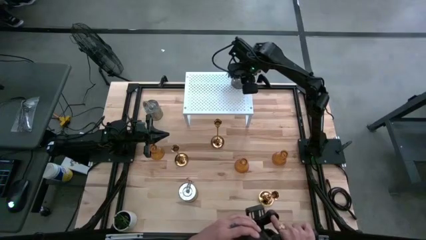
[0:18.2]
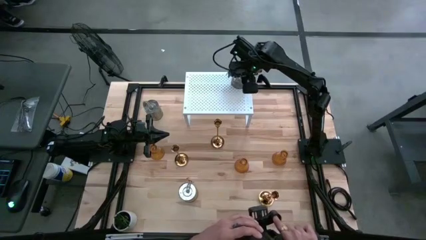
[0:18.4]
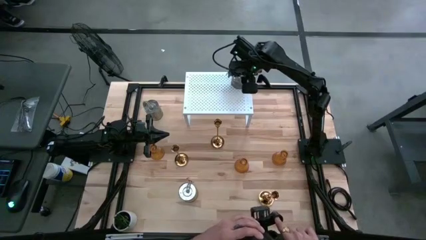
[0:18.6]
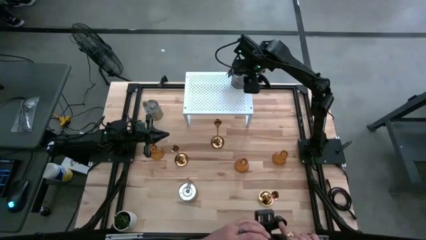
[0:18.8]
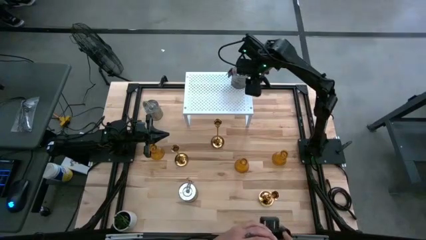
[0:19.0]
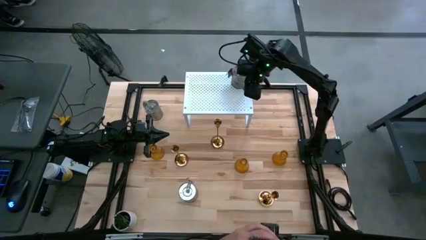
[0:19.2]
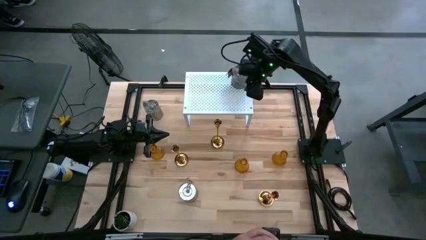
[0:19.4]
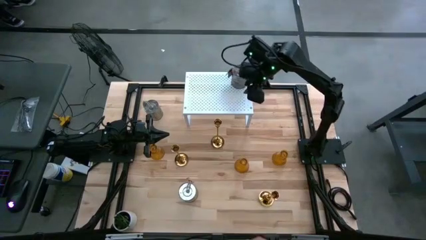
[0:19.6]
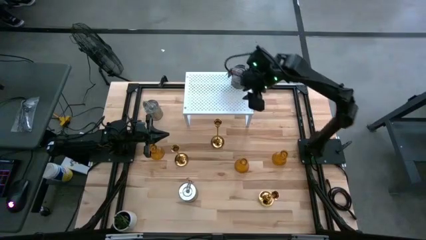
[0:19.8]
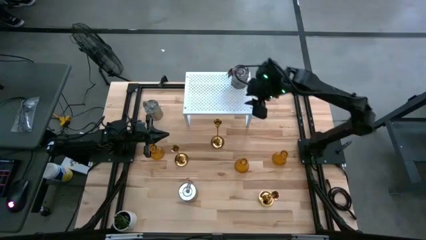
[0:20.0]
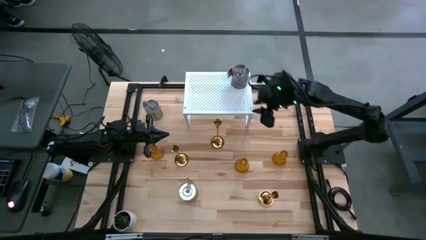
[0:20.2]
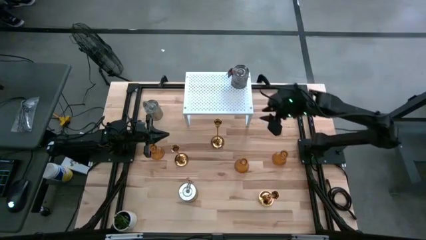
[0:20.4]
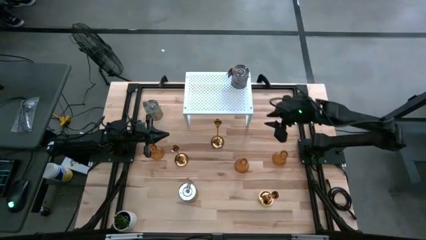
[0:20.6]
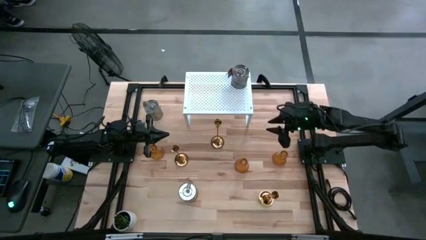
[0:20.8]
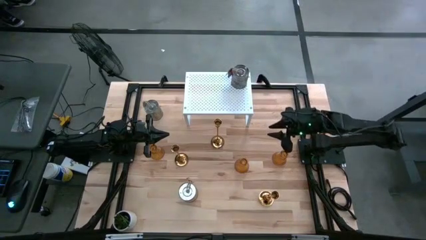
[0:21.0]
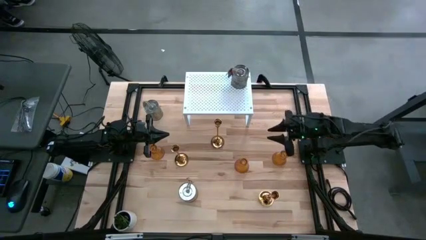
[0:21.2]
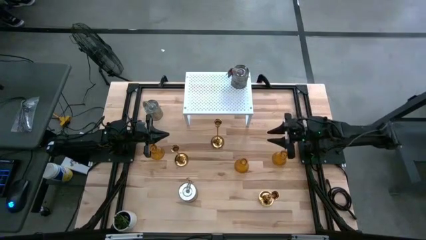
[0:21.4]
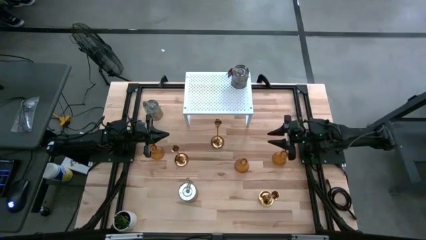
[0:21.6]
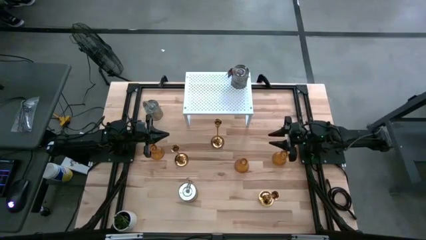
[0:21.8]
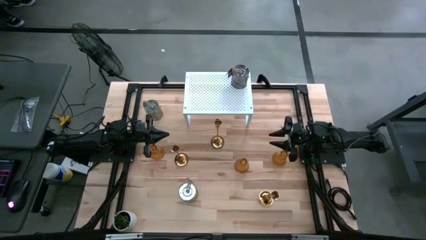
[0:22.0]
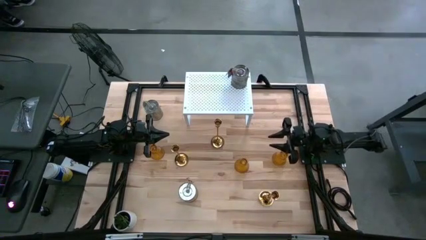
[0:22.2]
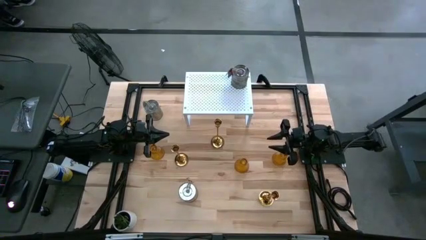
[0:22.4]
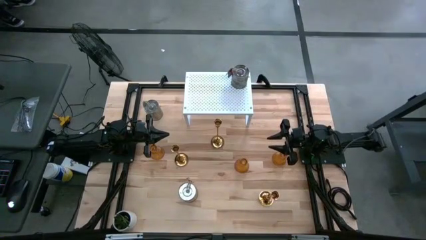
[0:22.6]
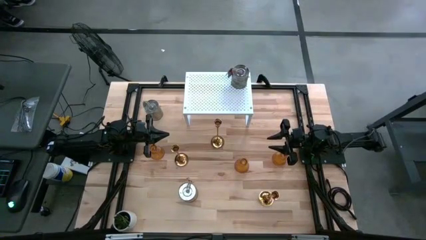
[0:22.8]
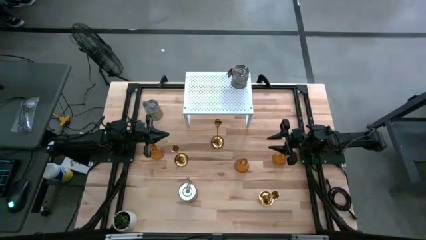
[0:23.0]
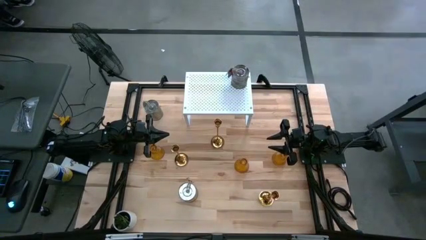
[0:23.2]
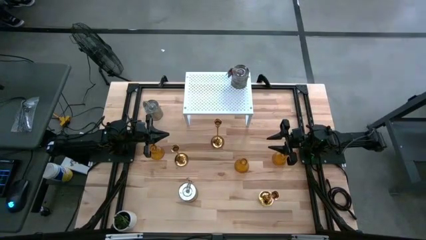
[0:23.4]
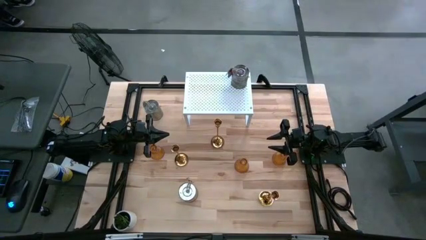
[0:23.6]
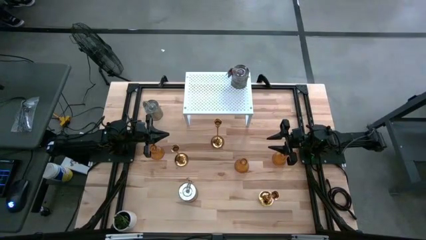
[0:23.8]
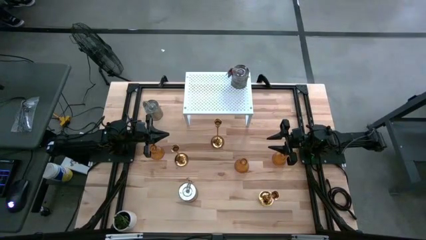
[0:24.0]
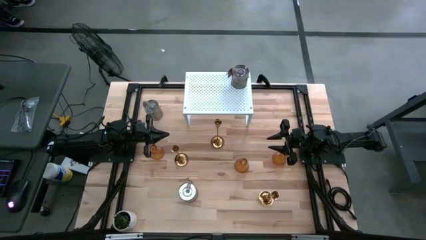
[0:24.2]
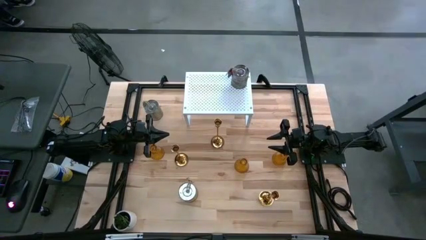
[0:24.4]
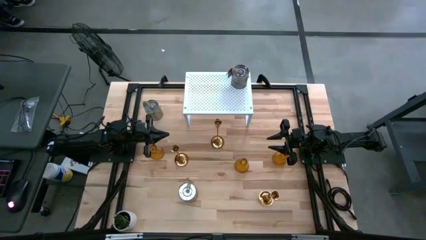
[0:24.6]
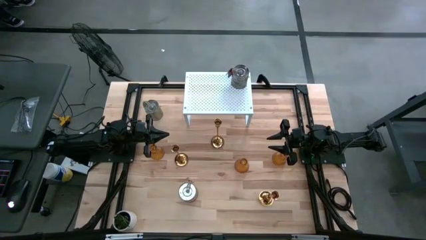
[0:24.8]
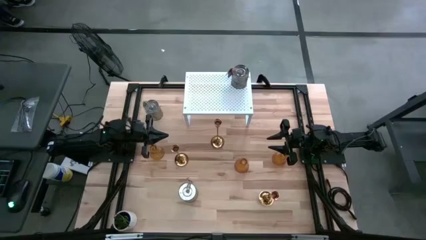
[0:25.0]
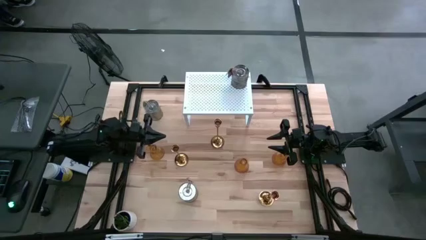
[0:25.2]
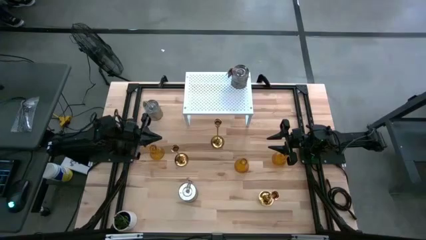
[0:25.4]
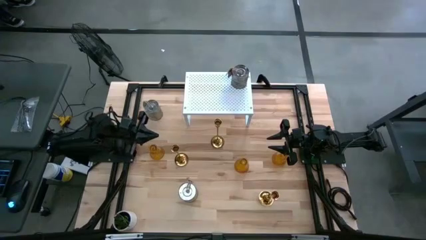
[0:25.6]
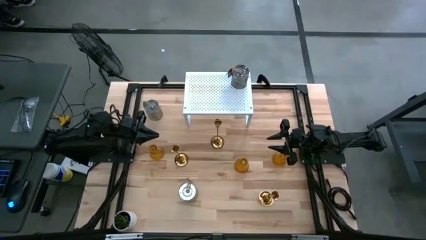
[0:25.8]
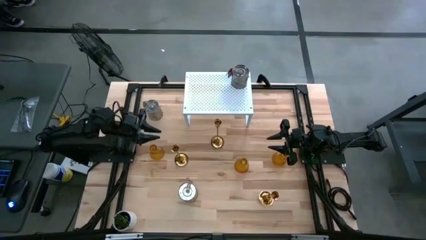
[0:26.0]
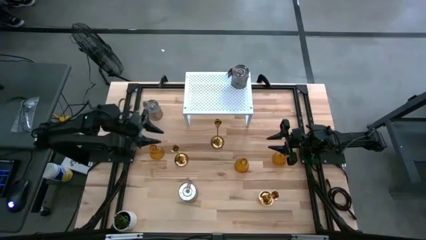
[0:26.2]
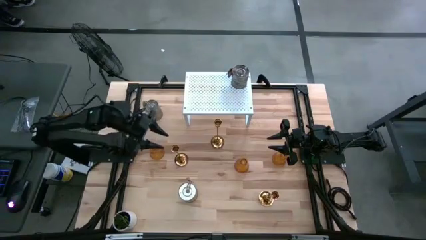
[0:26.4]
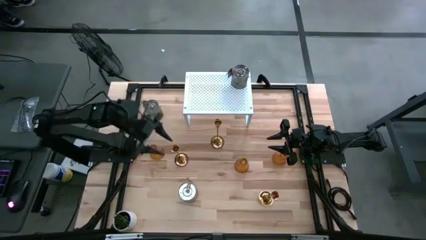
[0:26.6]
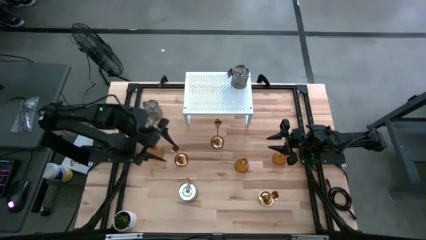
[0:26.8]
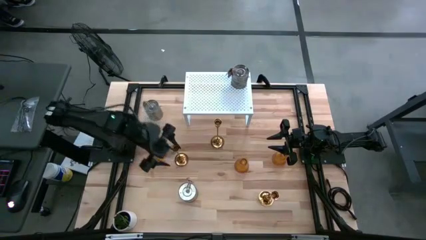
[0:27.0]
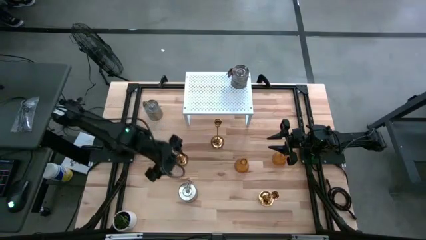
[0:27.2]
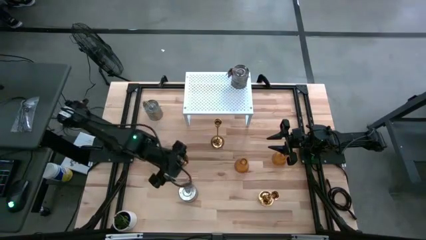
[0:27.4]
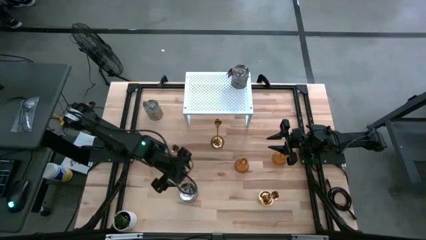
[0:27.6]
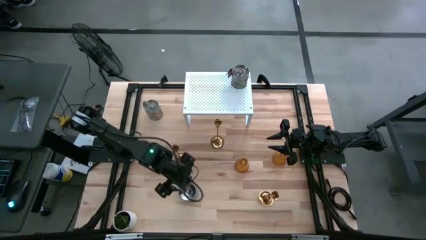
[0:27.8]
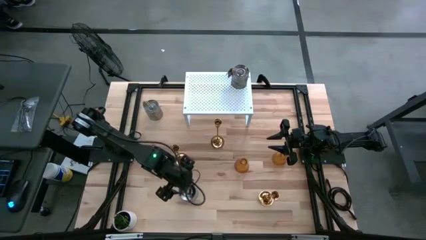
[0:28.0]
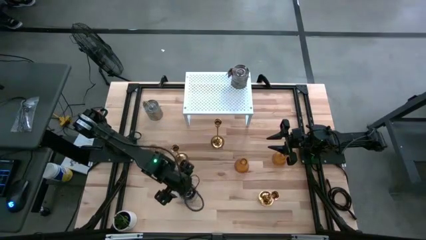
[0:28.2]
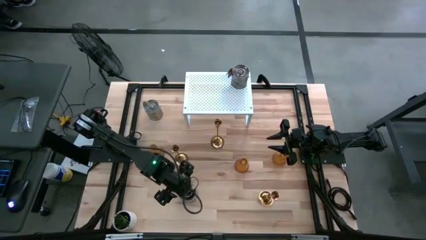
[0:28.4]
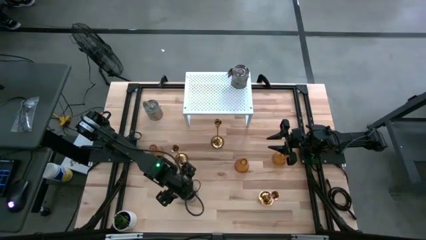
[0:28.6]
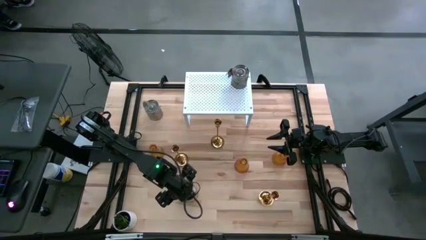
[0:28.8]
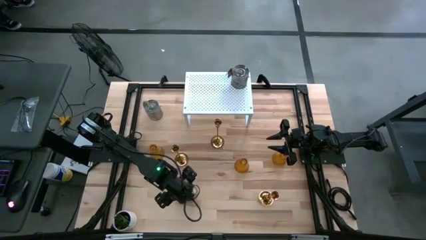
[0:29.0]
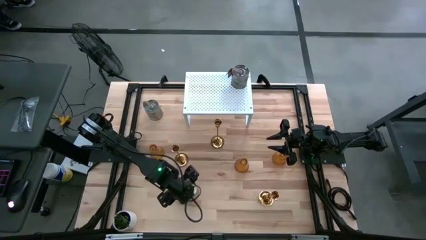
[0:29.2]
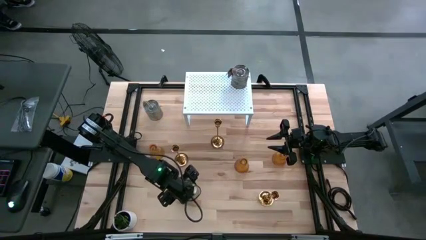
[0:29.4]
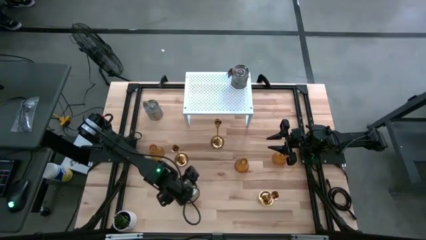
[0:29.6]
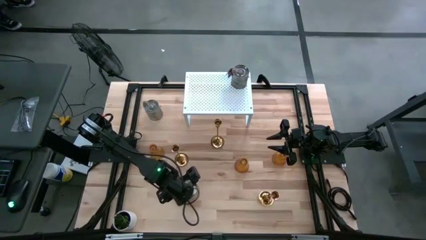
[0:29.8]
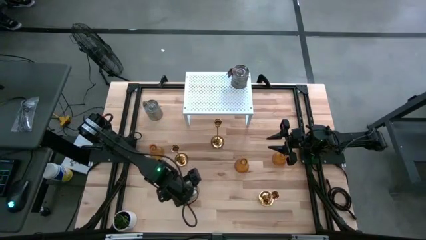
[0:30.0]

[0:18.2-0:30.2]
Task: Pick & Place candle stick holders
Put the bottom silver scented candle aligned with the other silver scented candle on the shelf

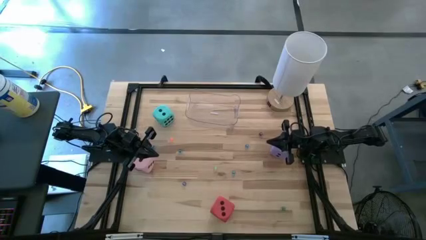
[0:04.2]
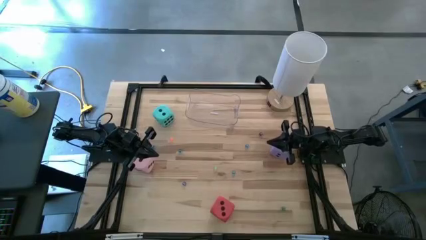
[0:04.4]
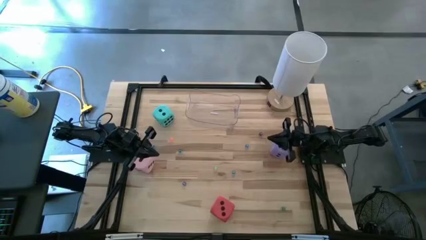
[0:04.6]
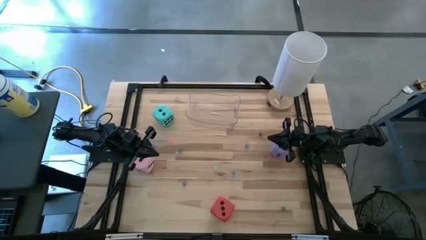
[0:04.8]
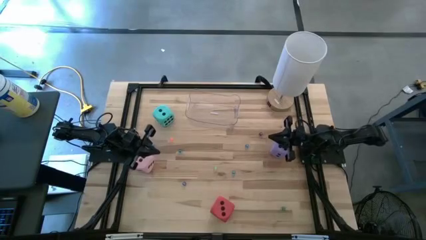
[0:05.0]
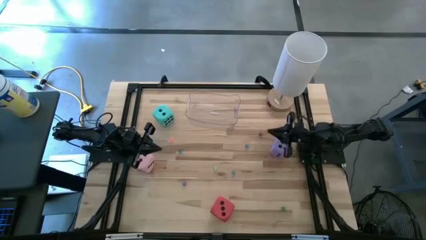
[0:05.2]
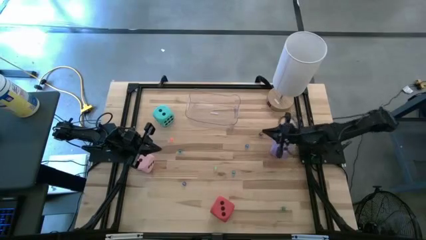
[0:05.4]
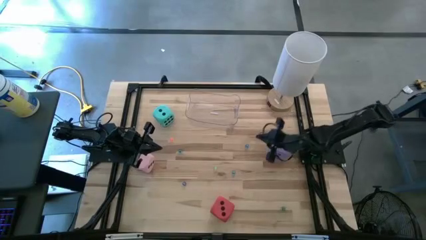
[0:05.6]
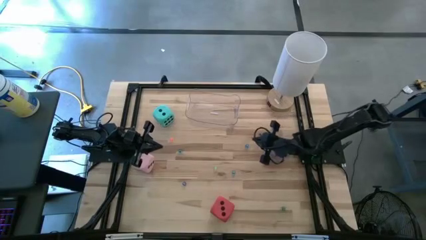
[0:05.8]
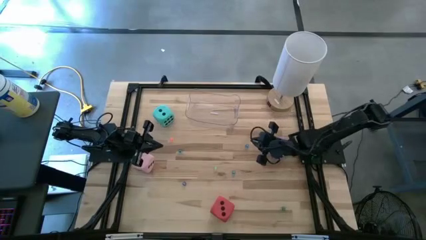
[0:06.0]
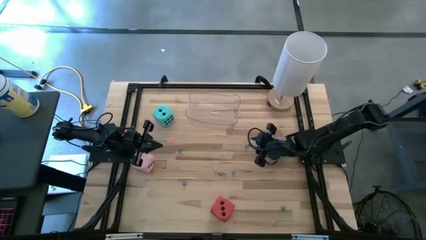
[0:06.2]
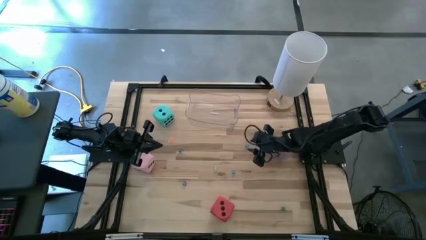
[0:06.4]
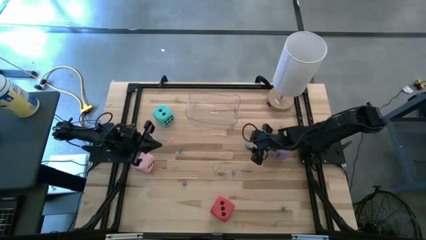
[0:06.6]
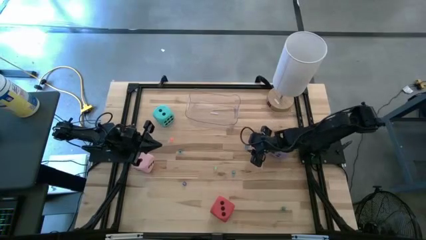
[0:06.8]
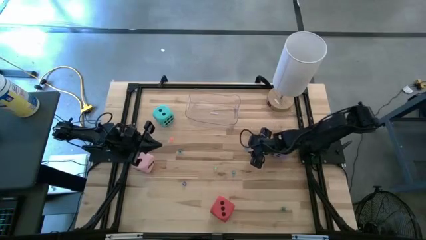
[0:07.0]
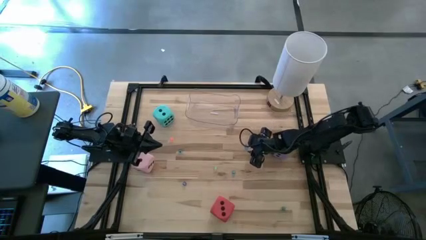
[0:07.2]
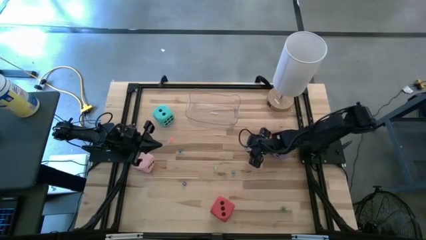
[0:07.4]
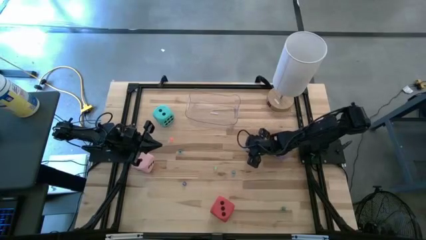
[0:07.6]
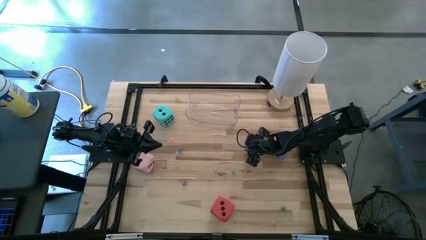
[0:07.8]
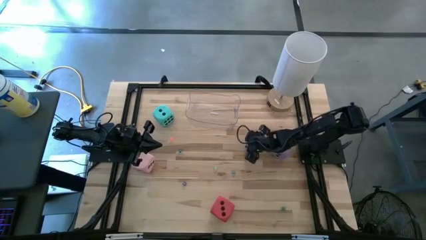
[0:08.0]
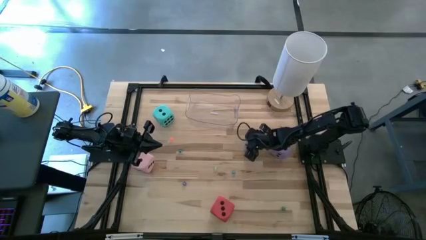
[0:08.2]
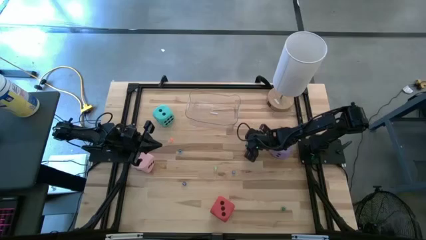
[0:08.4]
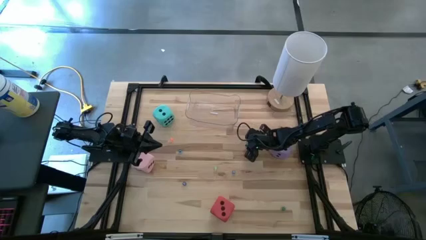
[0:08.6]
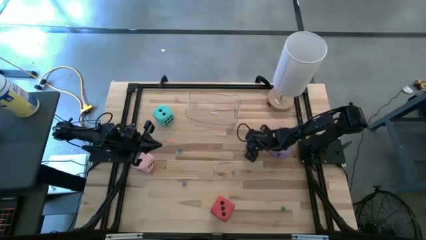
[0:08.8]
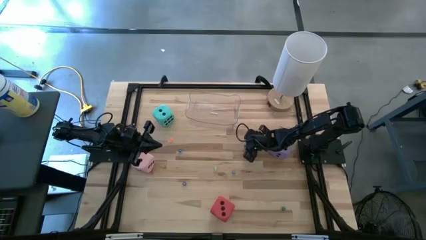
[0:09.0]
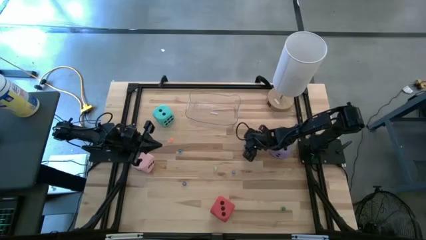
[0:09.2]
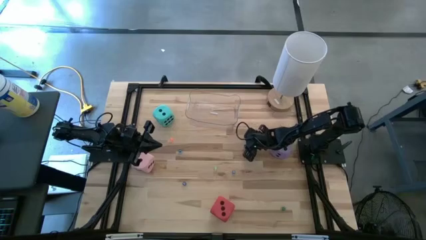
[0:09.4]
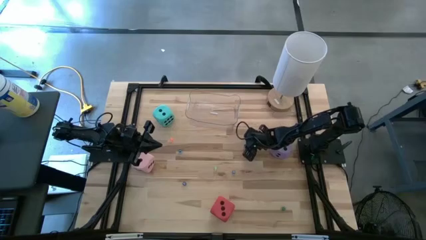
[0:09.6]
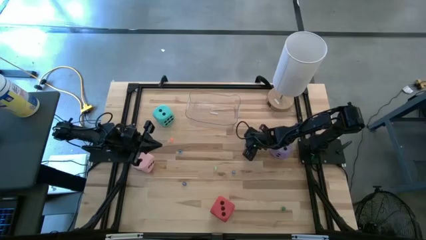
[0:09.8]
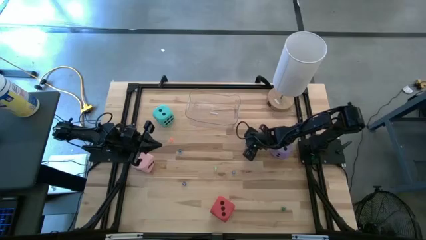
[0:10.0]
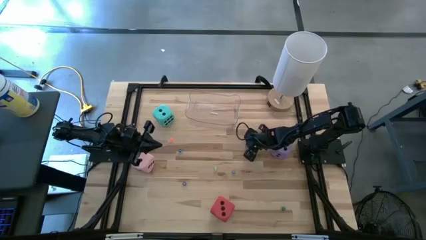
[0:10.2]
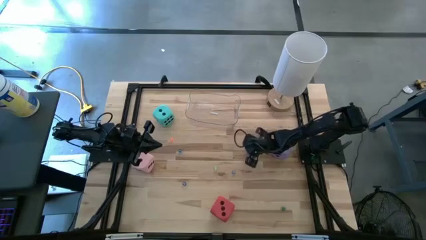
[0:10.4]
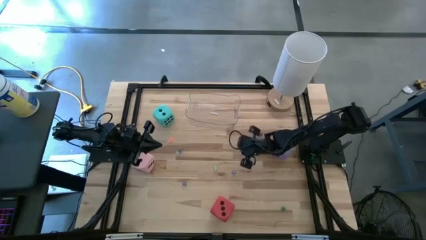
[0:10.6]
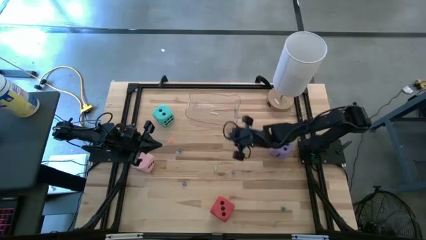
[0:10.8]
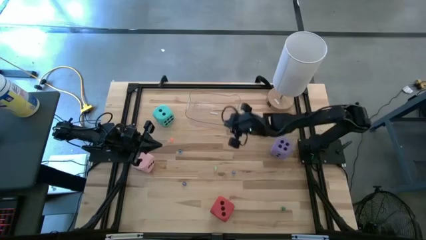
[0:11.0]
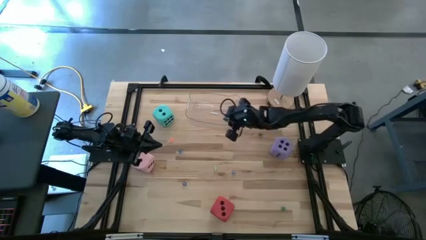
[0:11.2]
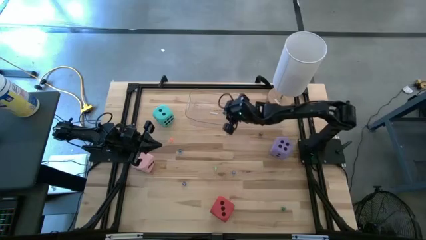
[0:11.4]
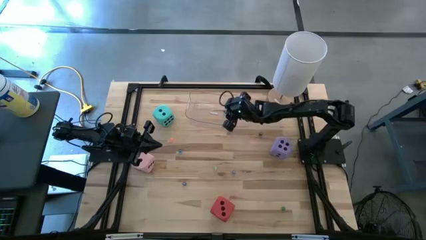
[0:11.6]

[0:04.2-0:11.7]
Task: Pick & Place Dice
Put the blue dice into the transparent bin
